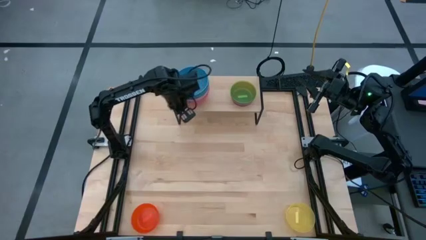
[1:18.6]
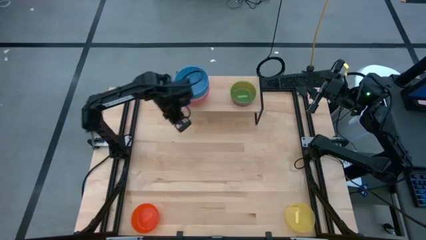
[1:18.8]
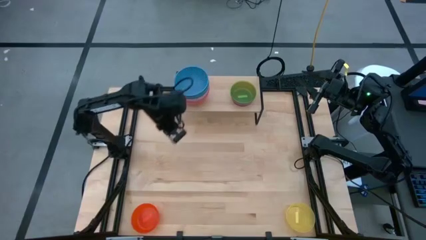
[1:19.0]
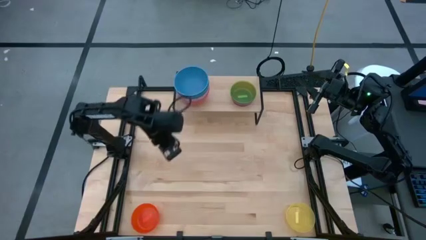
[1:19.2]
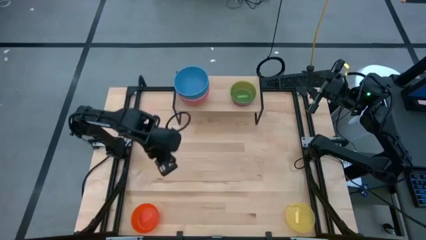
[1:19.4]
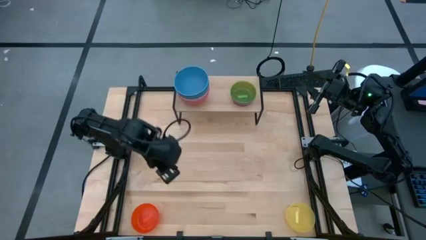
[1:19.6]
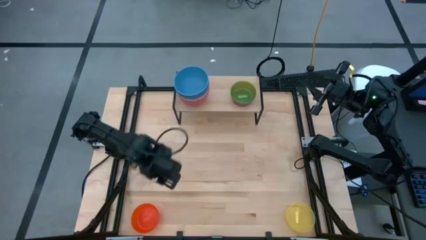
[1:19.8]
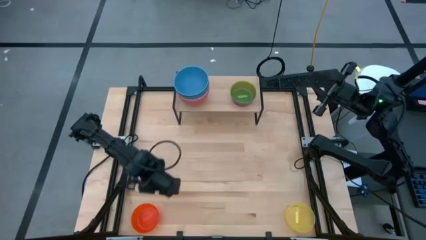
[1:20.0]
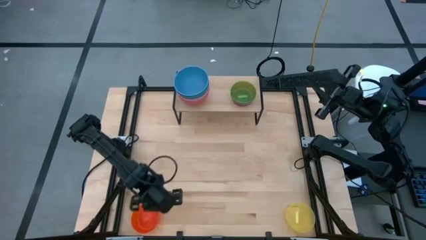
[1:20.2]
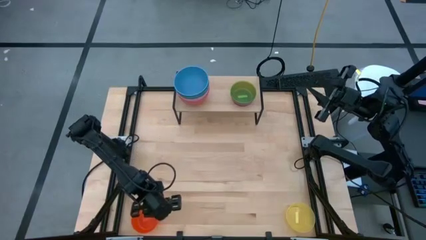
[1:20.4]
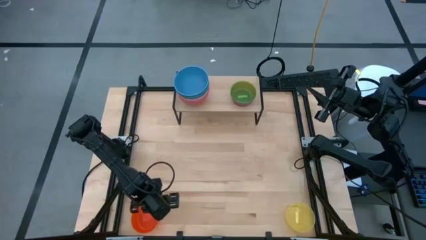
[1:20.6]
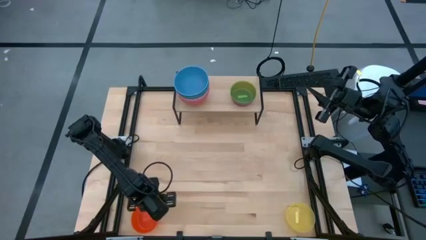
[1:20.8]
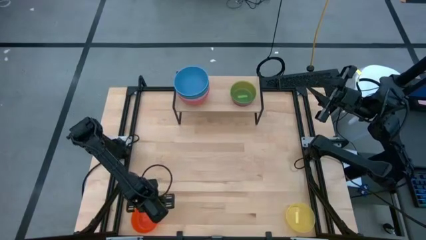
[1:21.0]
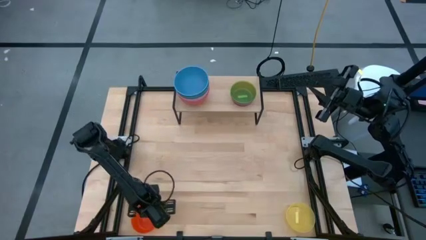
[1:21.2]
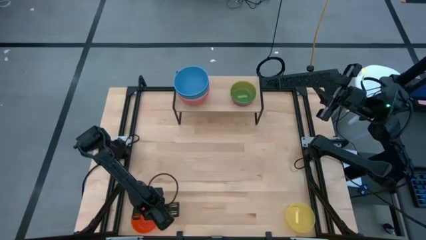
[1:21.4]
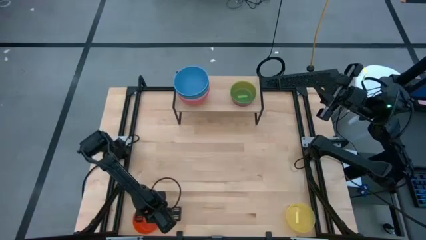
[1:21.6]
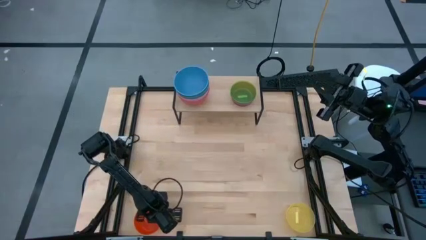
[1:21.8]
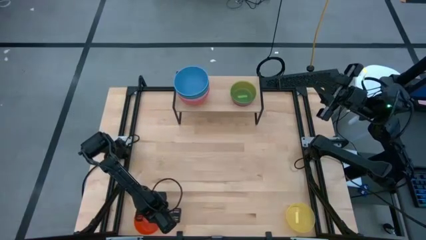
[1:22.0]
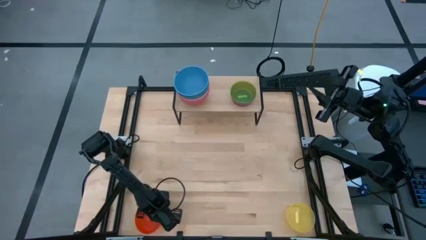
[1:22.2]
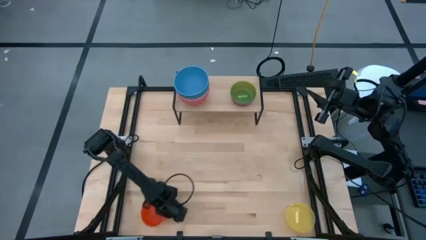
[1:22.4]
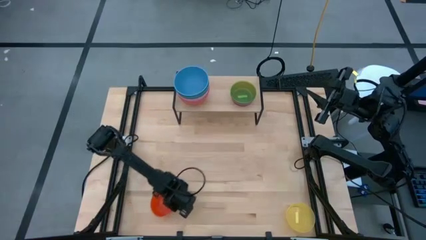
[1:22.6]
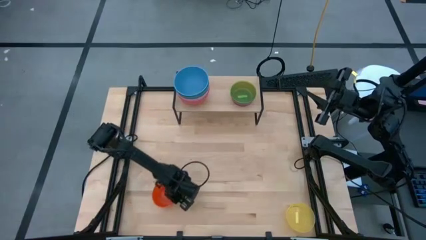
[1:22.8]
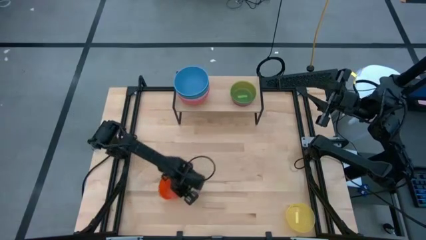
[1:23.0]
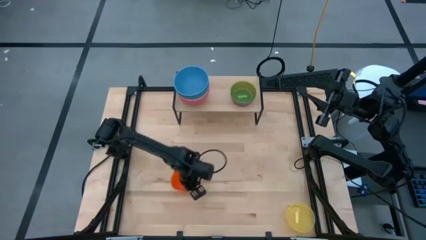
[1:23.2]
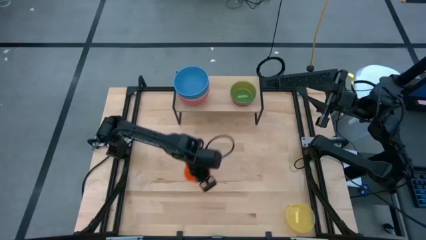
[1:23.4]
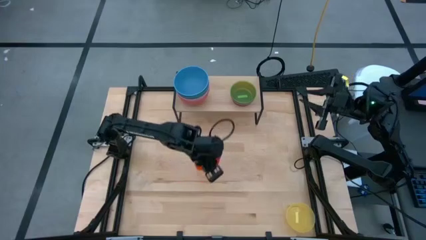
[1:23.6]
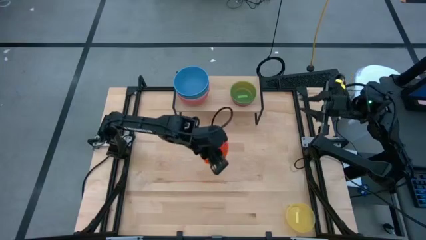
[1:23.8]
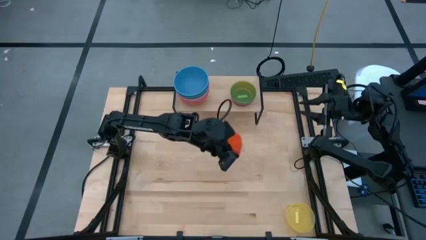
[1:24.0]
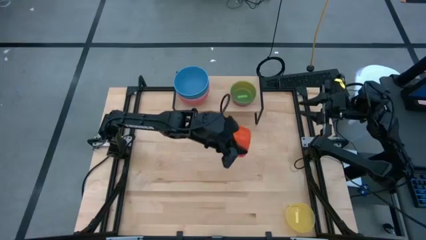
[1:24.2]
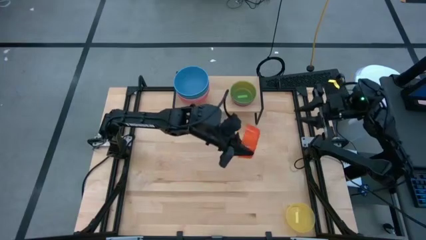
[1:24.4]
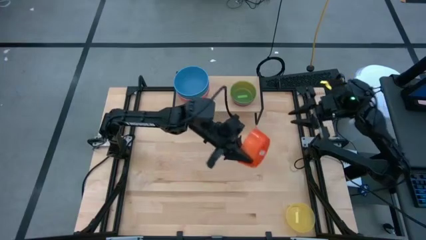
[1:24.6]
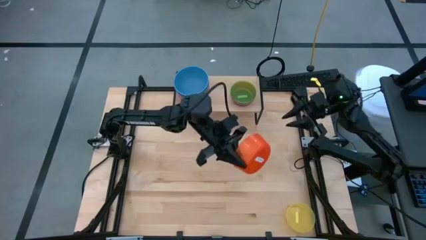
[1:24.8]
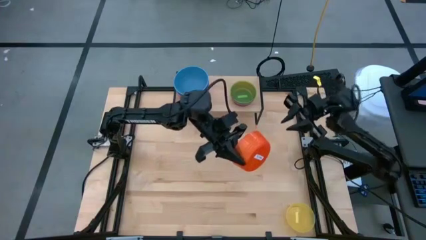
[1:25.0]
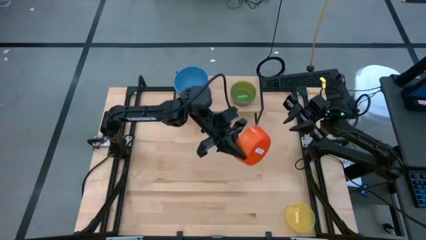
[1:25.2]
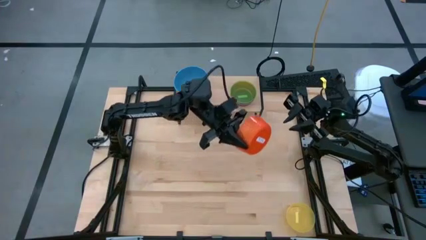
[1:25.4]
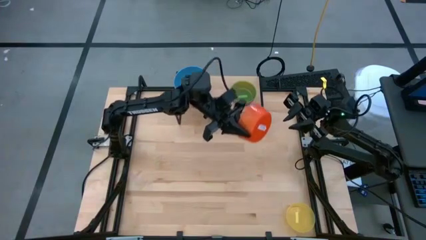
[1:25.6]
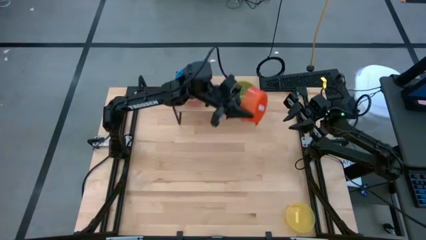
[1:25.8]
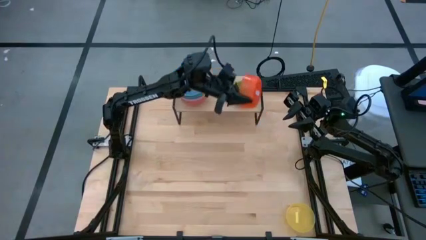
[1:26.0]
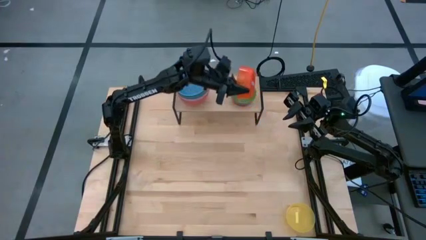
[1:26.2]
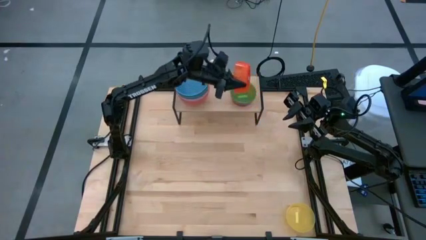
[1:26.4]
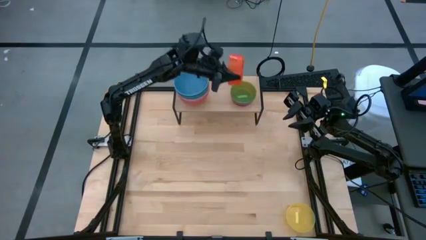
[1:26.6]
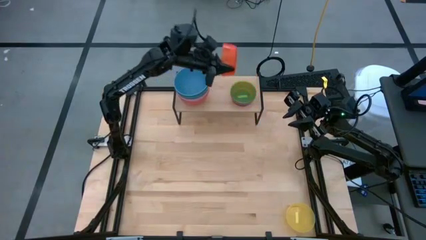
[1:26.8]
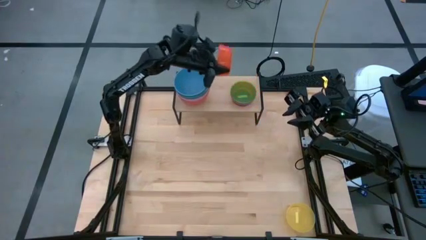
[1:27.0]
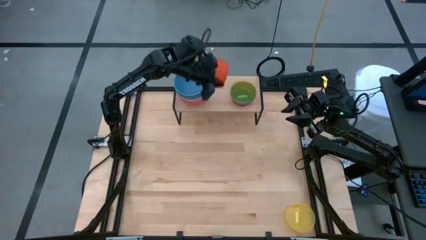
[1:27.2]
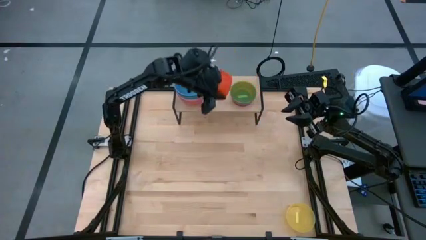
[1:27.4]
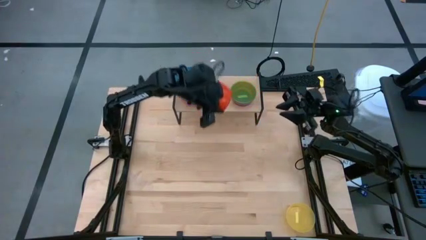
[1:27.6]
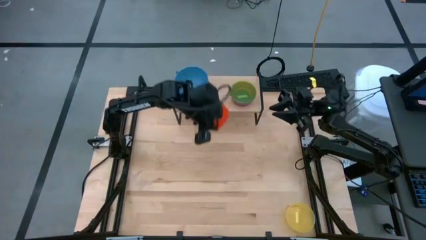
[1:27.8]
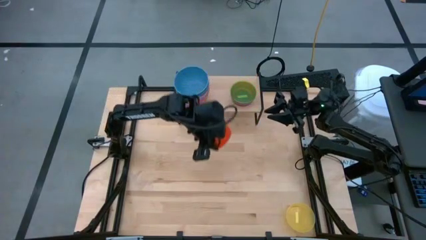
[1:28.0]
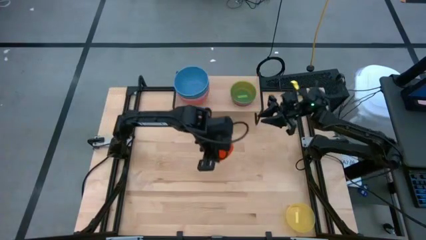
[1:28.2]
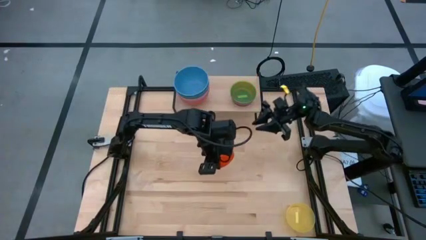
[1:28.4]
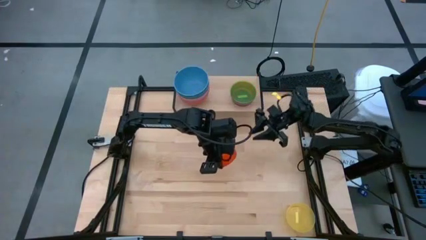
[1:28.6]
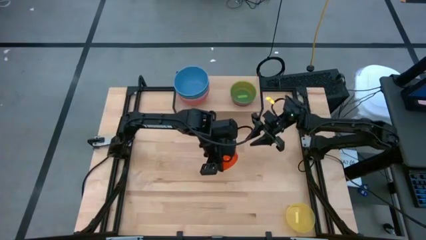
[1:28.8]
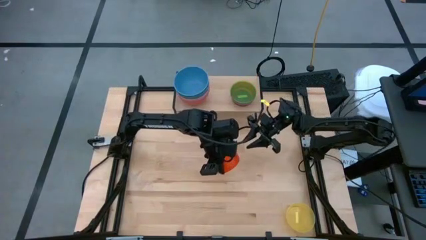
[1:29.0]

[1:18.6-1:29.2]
Task: Place and stack bowls onto a shelf
Stack the orange bowl on top of the green bowl on the shelf

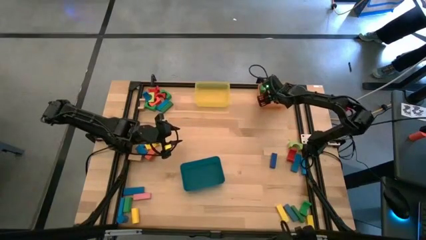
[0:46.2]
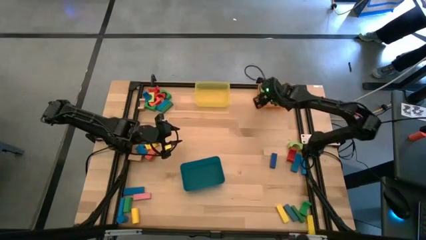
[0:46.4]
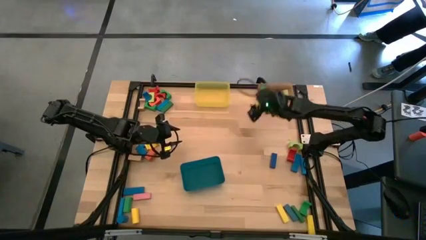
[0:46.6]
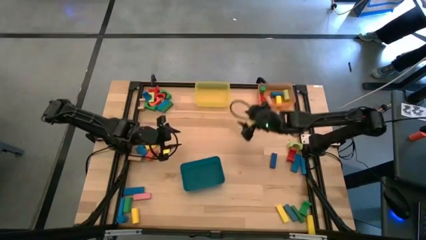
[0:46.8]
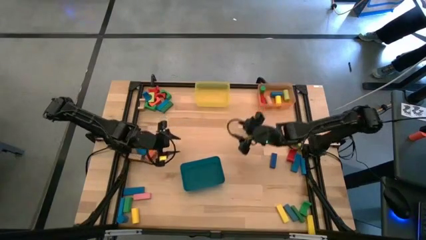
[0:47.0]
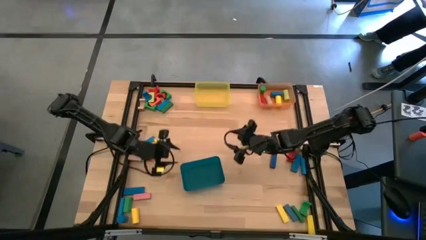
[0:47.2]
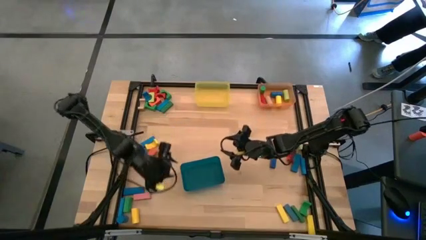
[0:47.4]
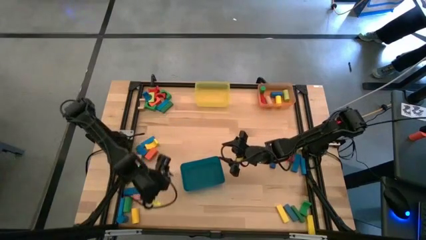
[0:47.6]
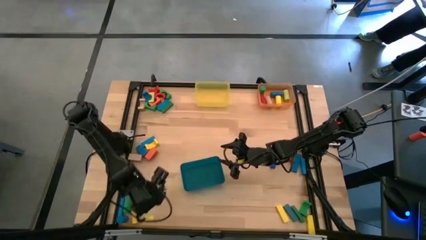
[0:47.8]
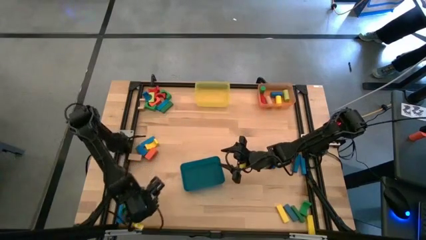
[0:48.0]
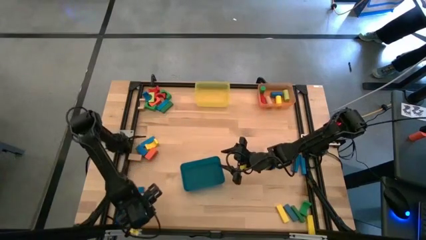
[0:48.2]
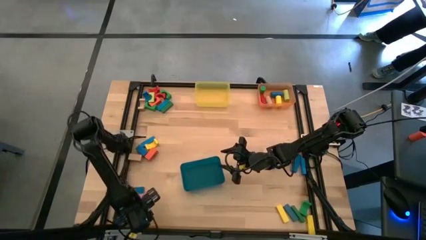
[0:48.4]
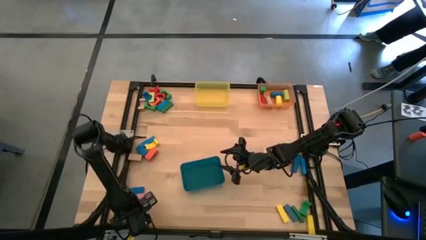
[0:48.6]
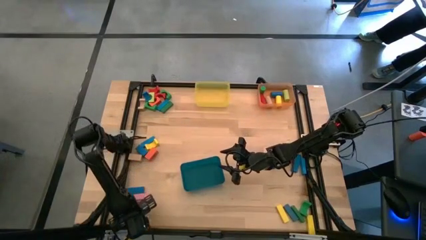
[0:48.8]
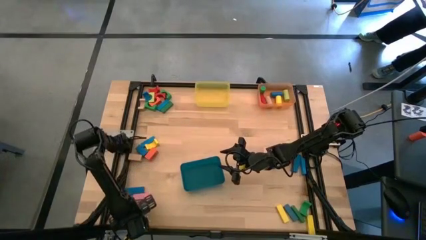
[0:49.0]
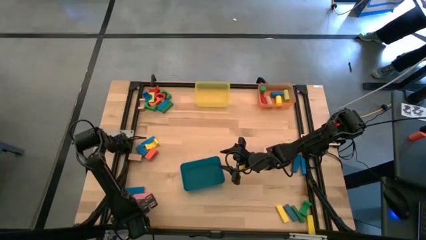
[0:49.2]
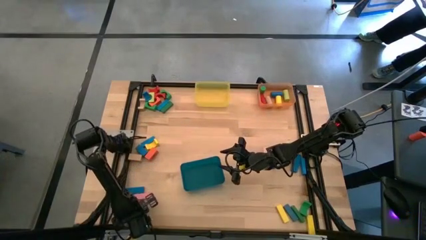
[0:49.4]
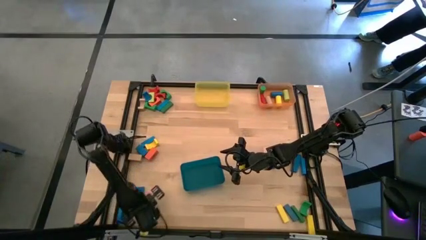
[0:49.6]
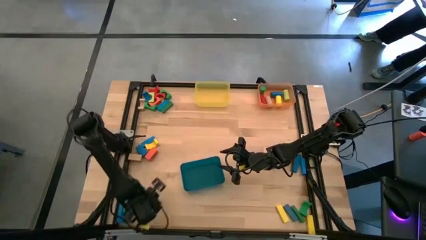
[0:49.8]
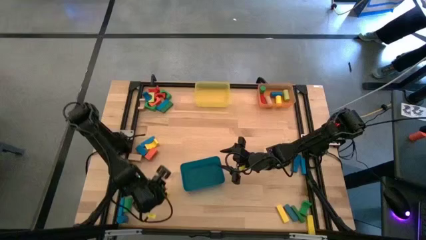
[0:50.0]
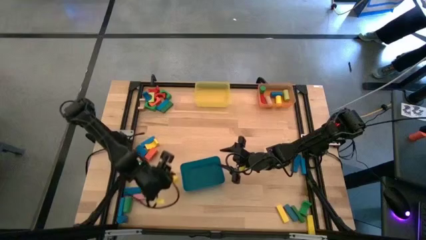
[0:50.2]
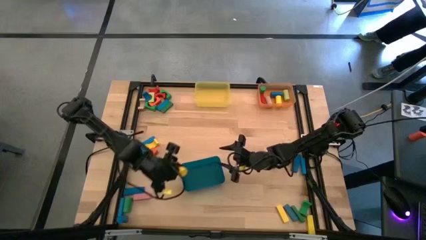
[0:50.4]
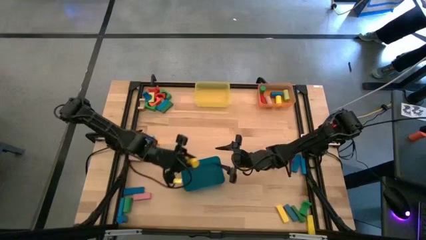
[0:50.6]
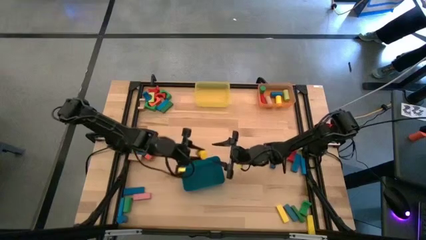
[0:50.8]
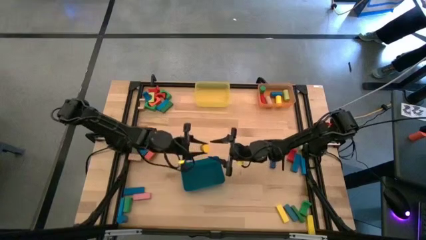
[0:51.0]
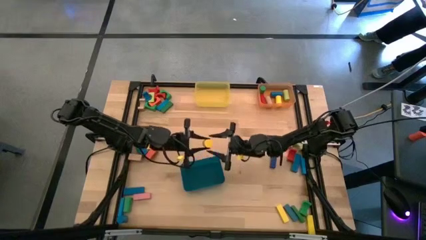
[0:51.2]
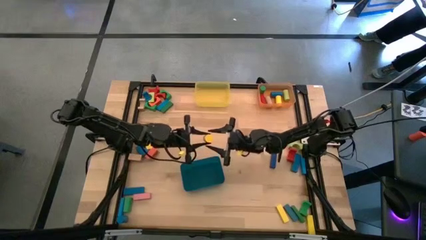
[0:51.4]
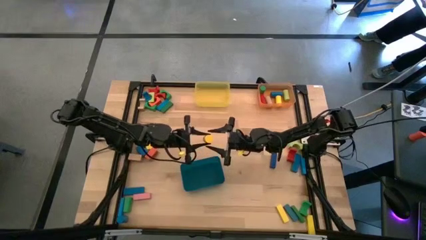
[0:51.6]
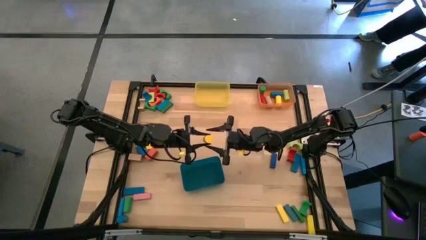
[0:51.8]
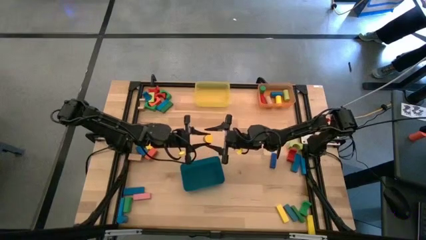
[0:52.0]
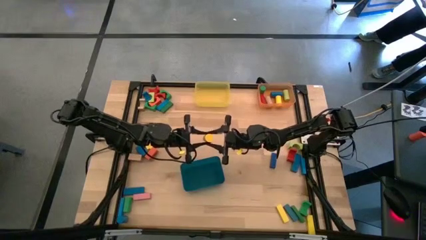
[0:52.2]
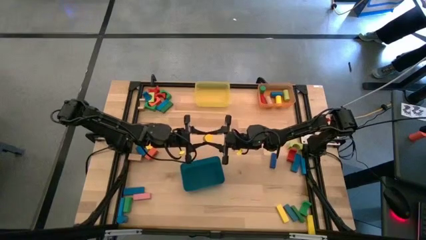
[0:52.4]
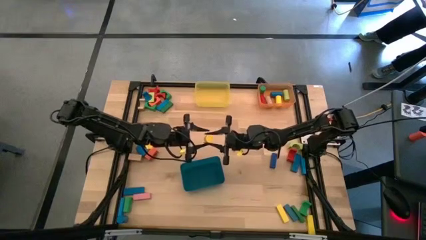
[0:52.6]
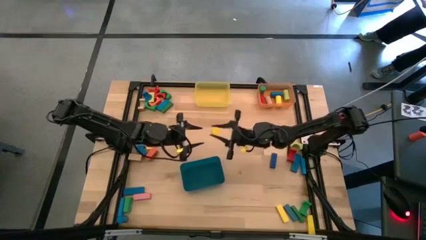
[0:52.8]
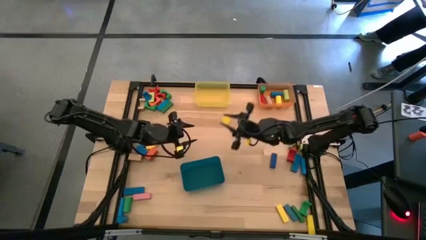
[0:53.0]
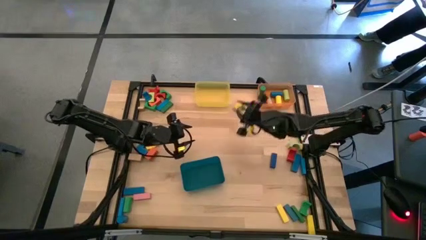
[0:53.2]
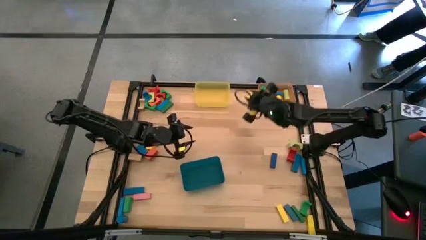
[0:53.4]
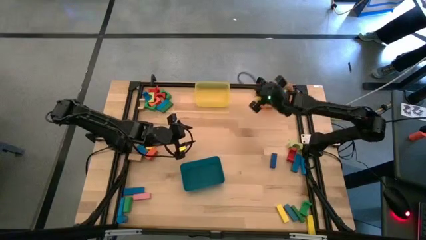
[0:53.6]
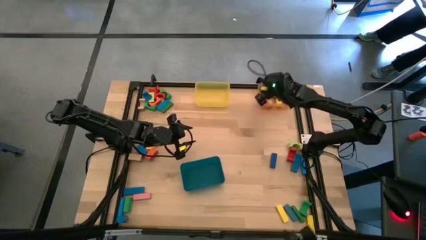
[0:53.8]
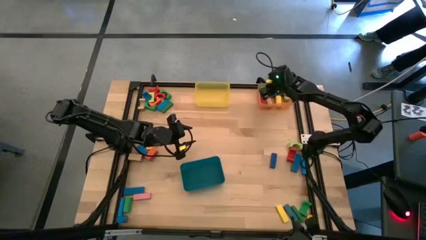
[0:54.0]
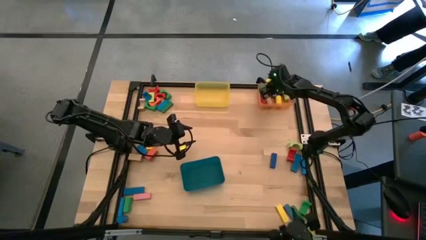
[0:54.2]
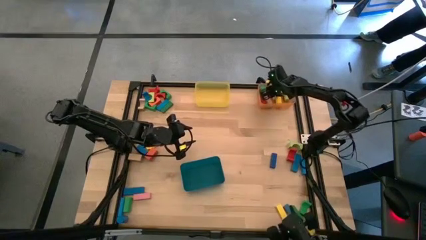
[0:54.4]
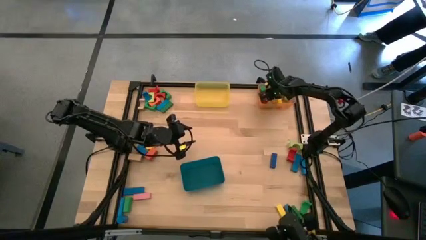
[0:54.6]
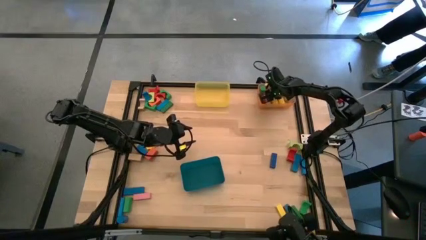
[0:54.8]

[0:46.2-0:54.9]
Task: Sort blocks by size
Put the yellow cylindrical block into the orange bin
